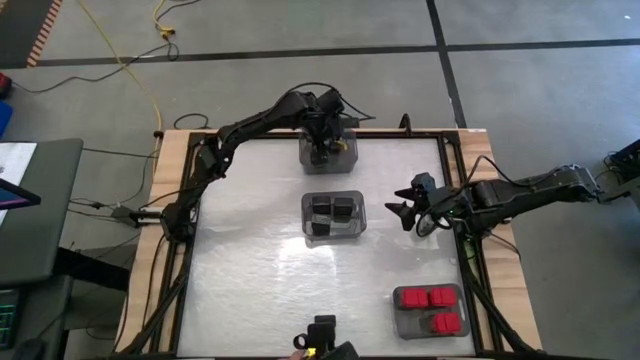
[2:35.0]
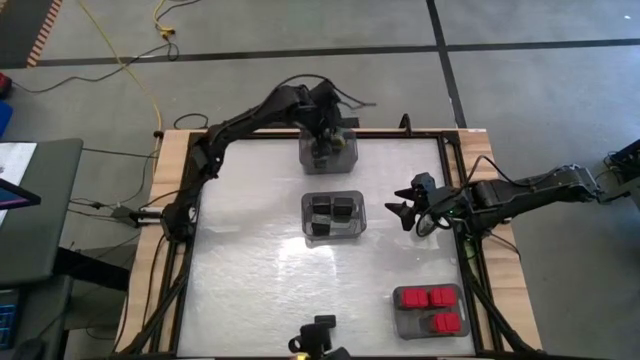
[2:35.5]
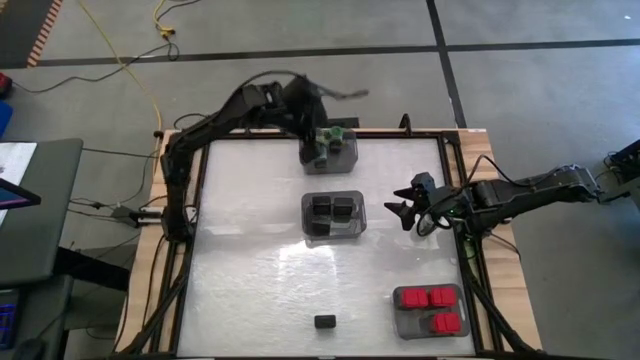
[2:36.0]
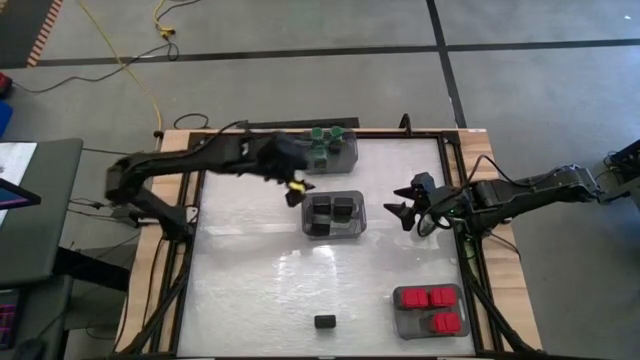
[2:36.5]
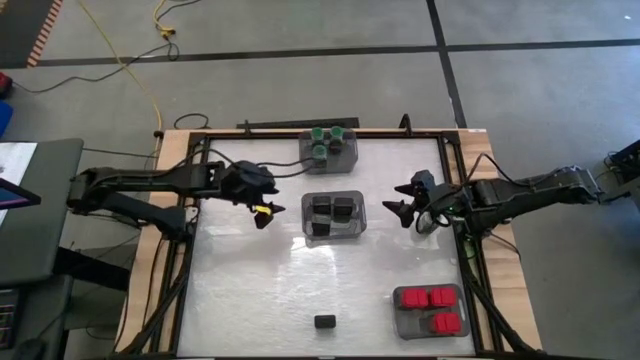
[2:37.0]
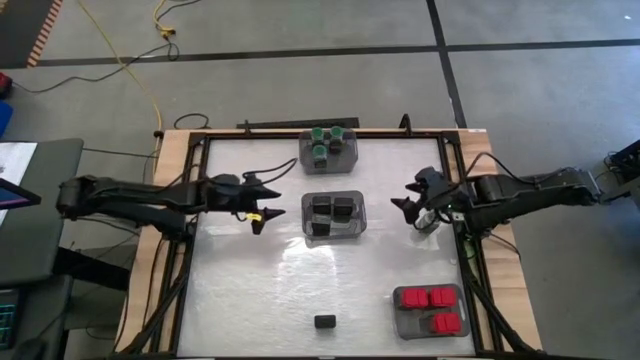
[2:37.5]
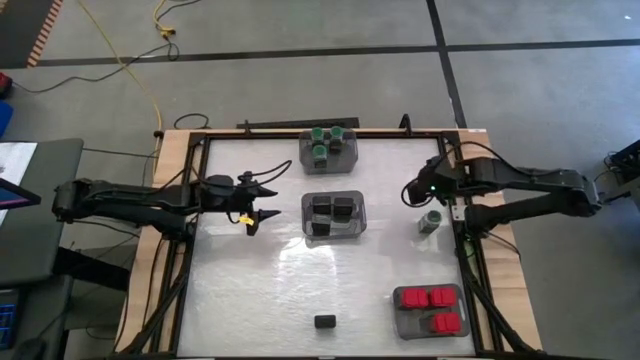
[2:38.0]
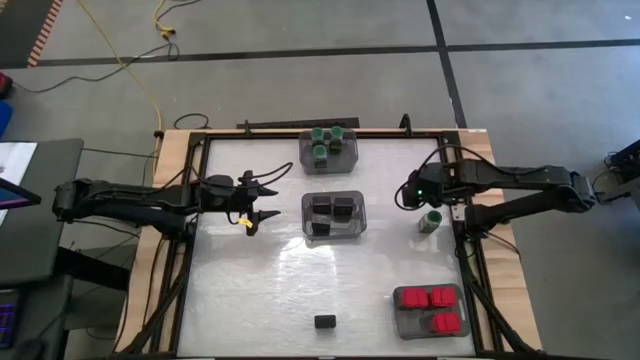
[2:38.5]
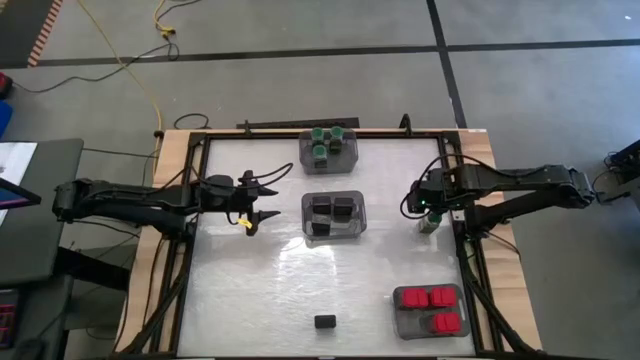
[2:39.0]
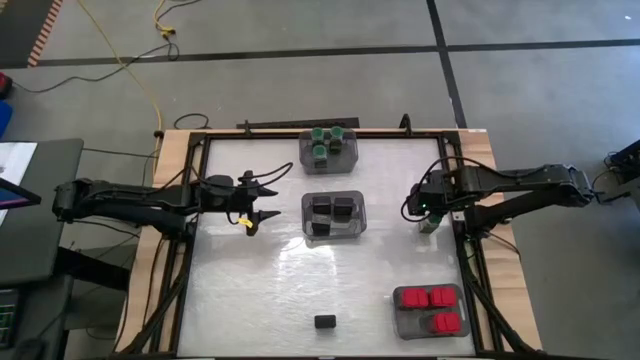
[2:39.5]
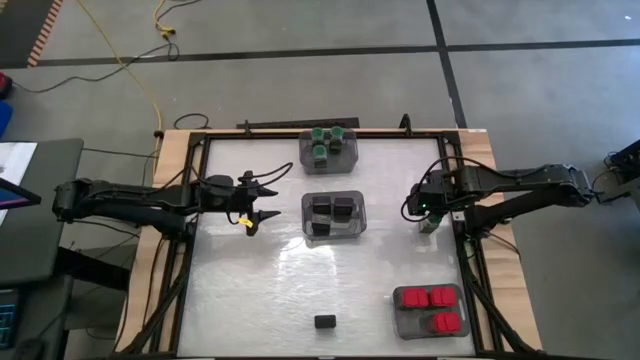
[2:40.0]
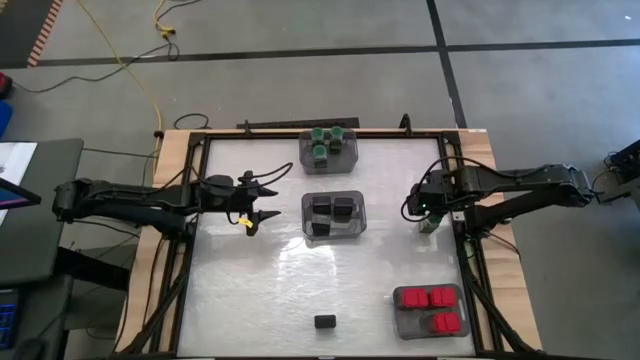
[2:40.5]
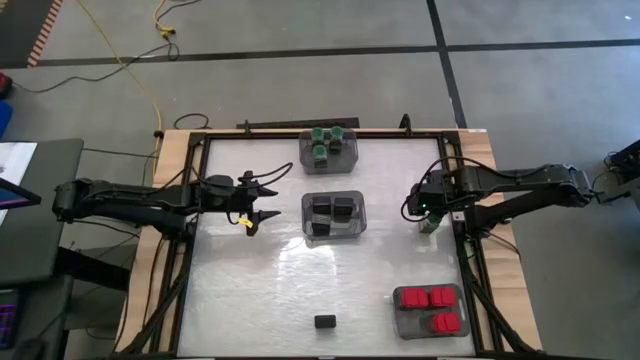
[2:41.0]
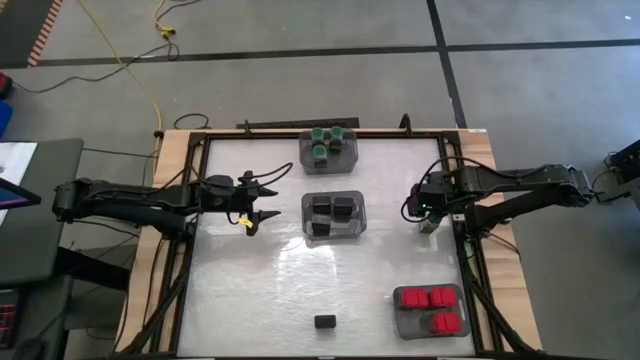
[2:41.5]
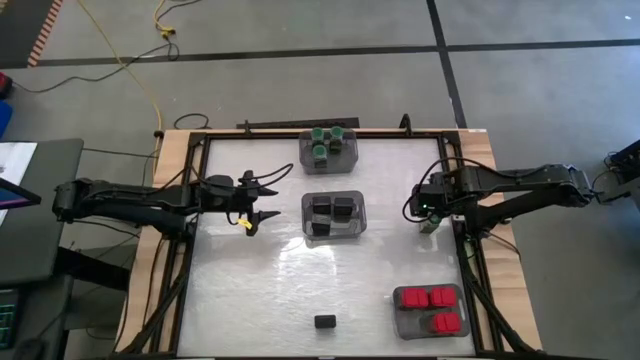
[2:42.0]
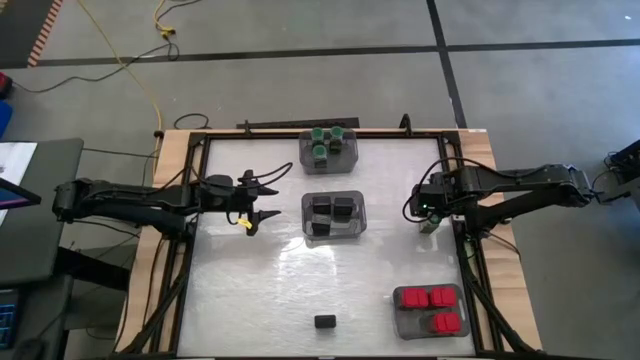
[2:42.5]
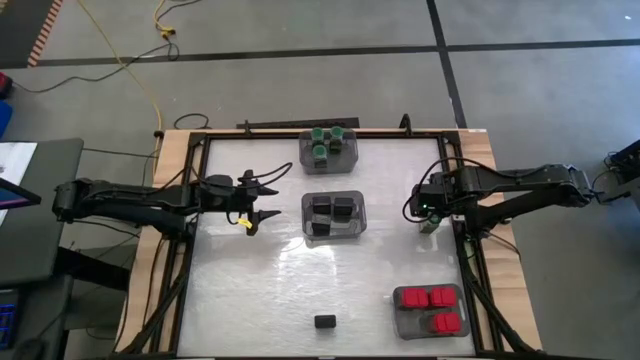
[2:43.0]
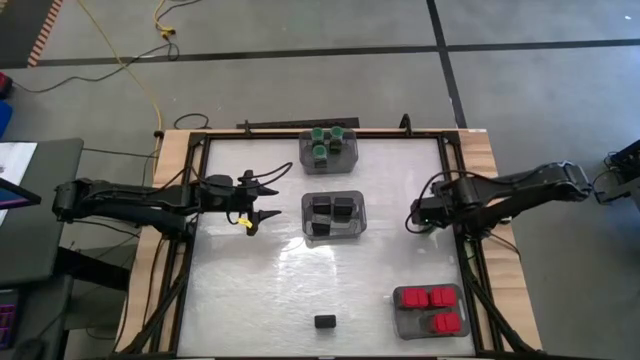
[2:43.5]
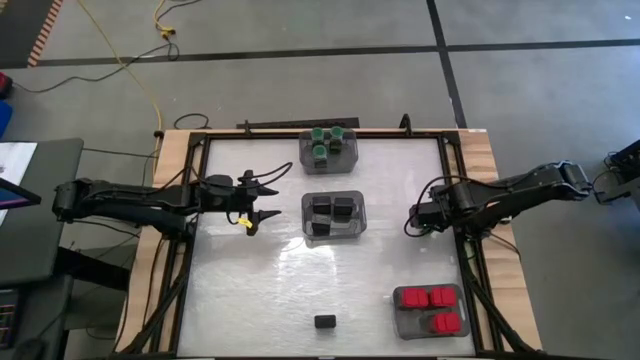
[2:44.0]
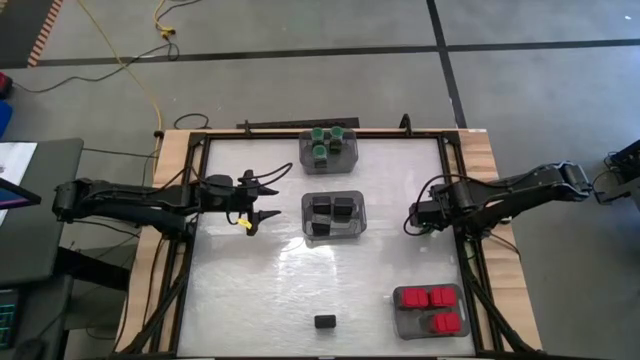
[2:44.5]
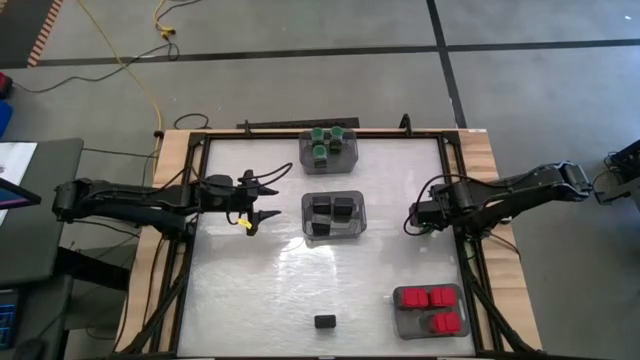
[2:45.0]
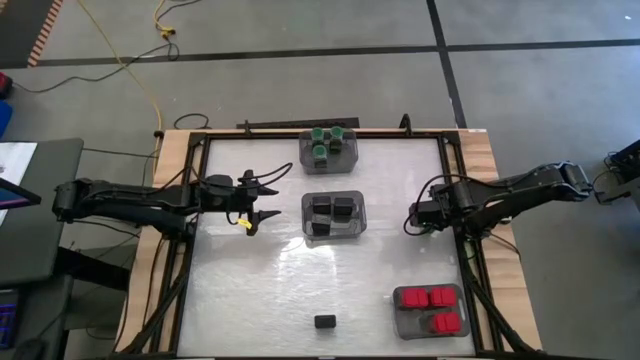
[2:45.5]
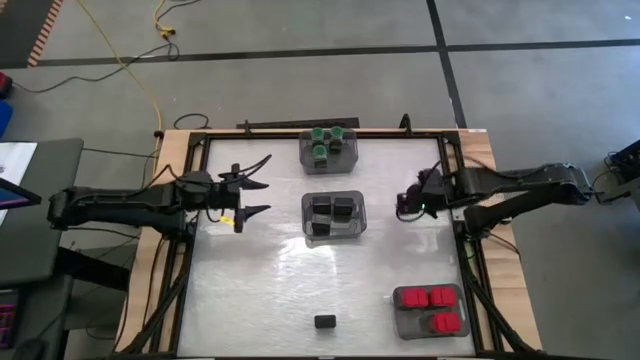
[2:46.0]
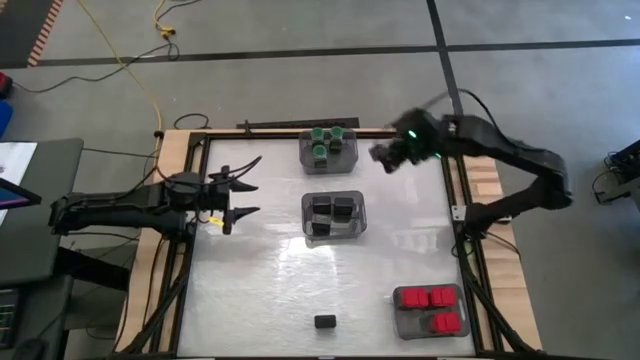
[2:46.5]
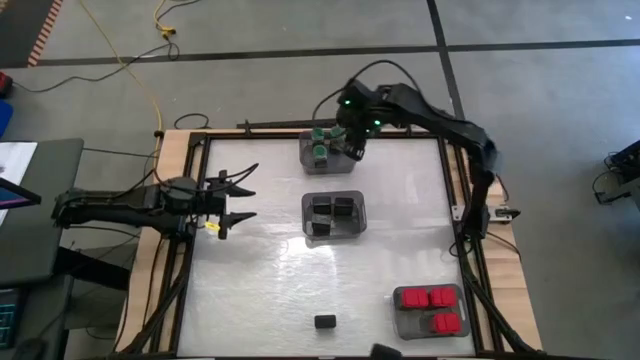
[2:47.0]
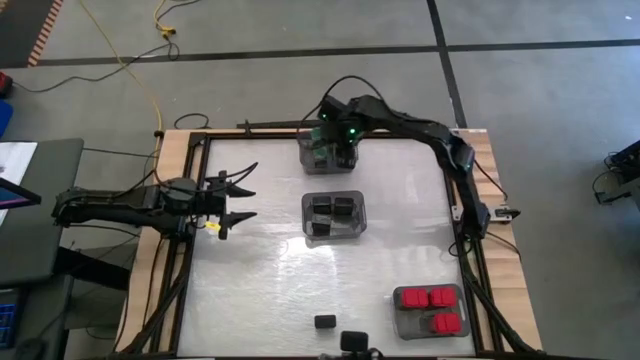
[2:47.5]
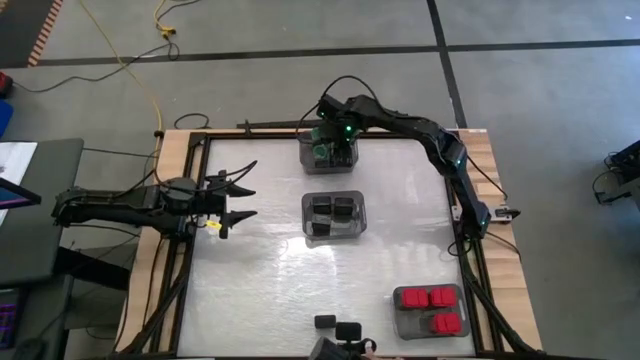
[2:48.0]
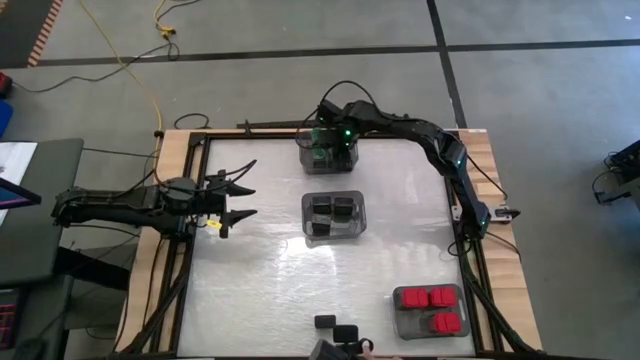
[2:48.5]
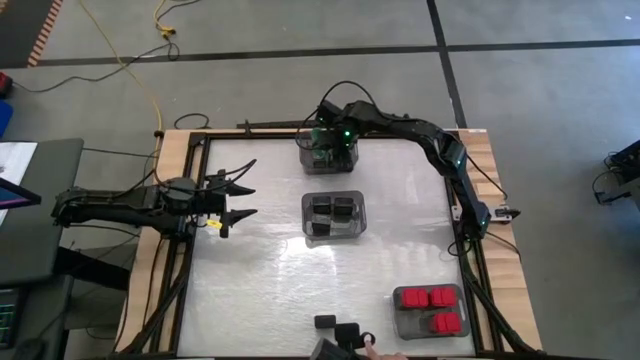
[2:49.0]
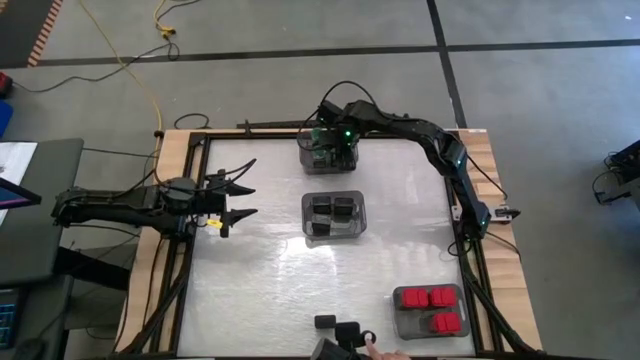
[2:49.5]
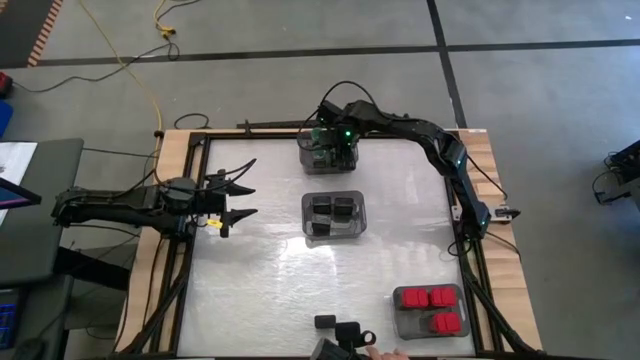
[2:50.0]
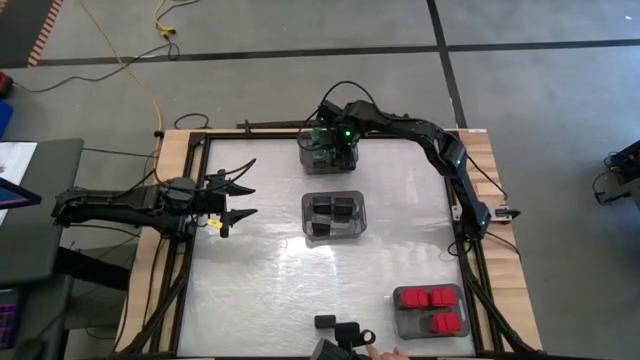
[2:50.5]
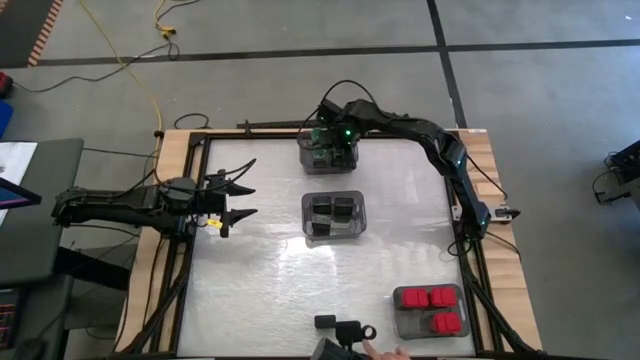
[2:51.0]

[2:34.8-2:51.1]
Task: Sort spices by type
Put the green seasoning bottle into the top black bin

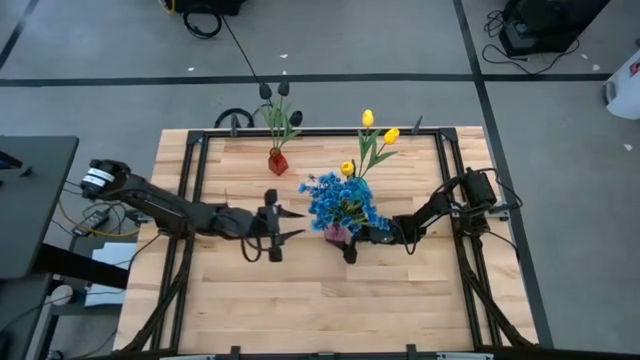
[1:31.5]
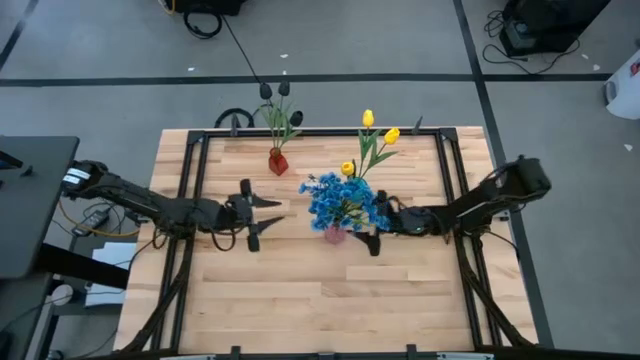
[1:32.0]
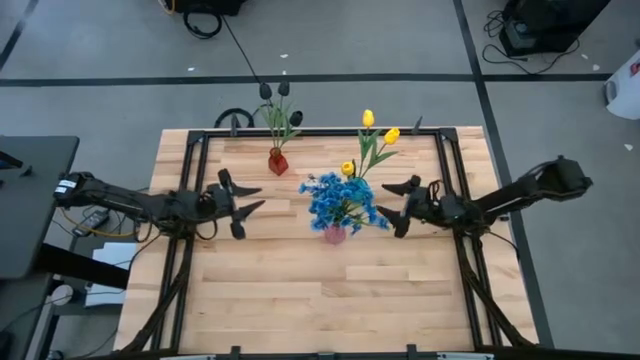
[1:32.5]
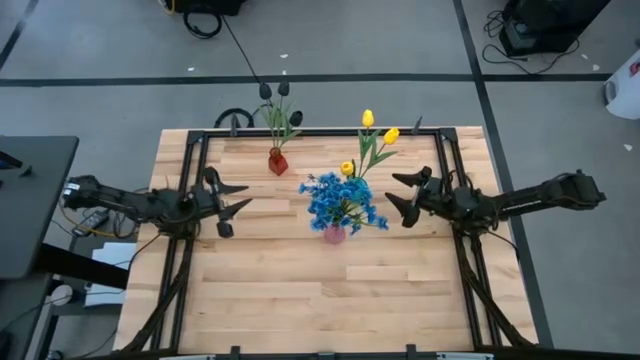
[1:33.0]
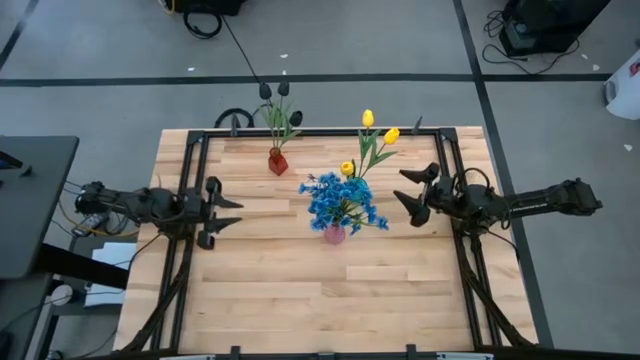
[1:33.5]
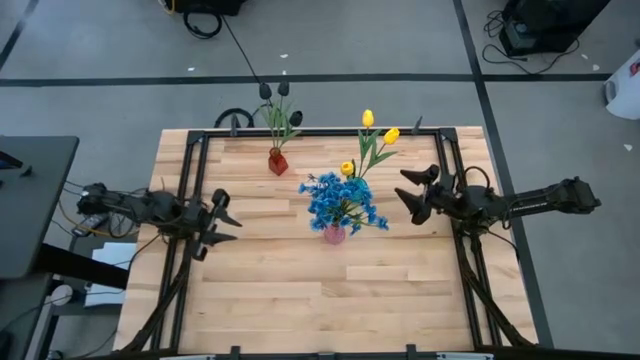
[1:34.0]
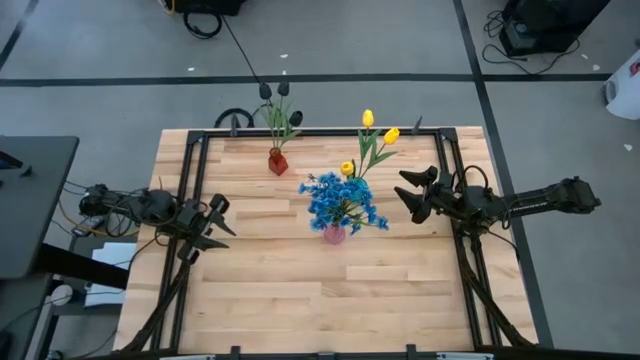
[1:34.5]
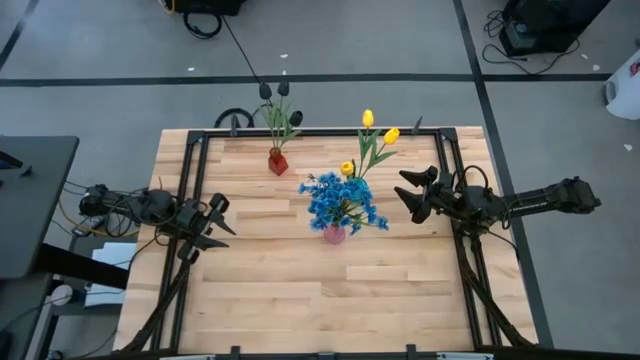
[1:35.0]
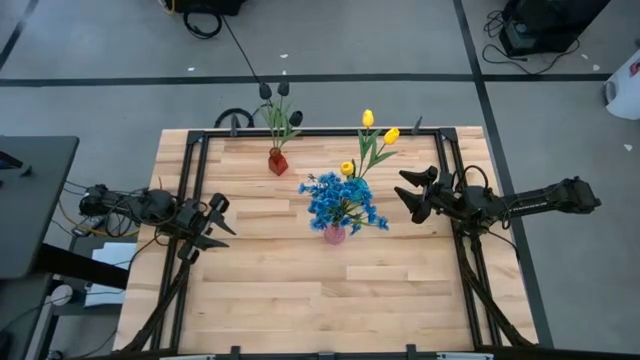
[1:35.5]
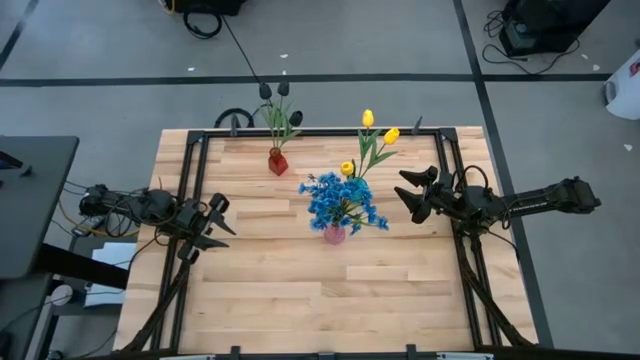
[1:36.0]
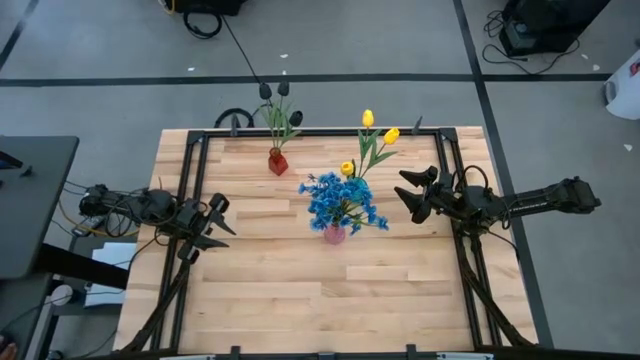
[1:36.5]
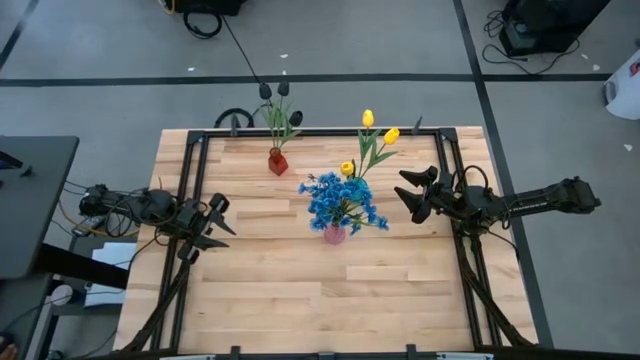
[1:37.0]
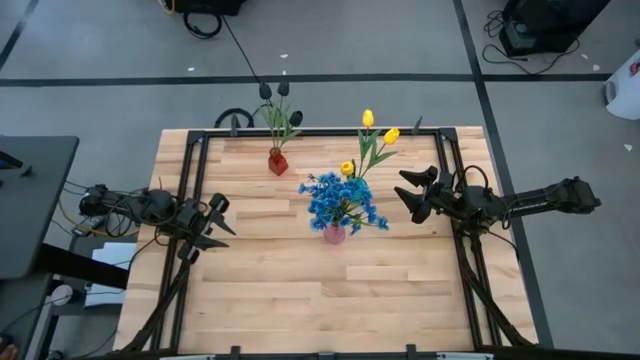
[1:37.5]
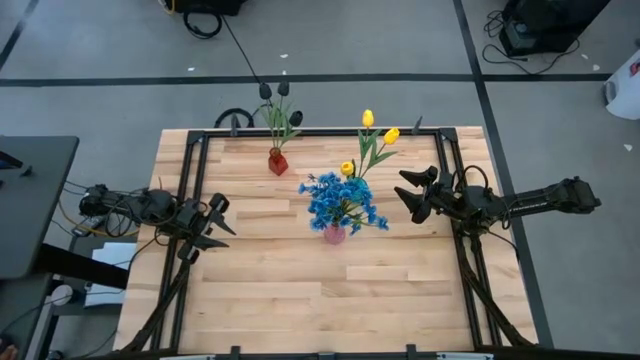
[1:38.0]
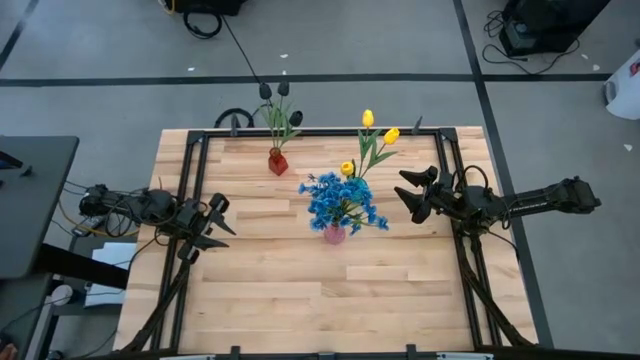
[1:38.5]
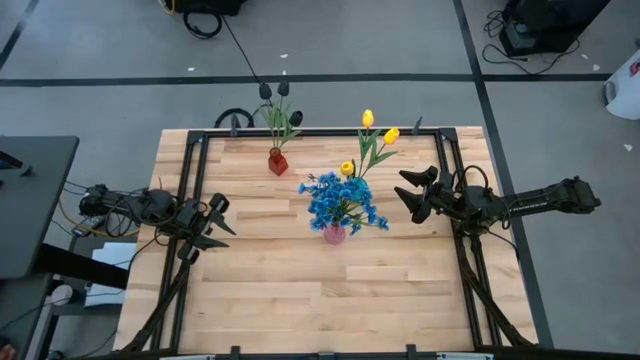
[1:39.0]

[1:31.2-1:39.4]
Task: Sort flowers into vase by color
Return to Home Position
